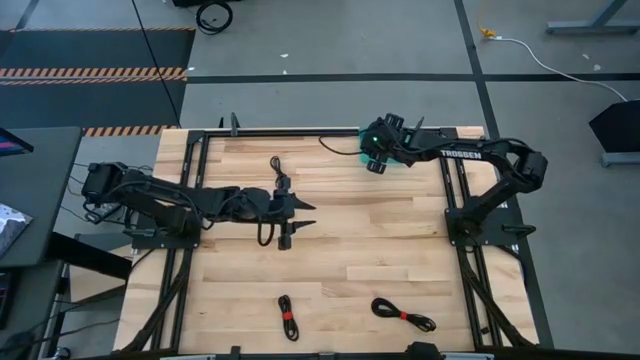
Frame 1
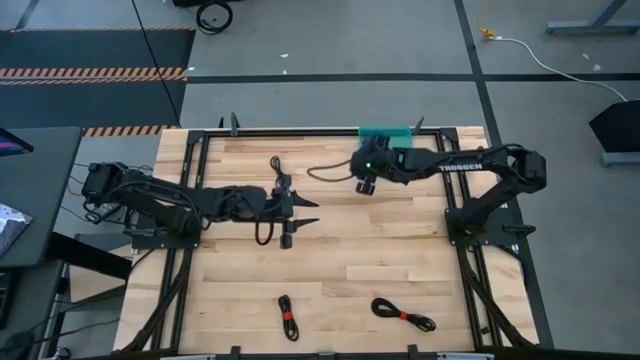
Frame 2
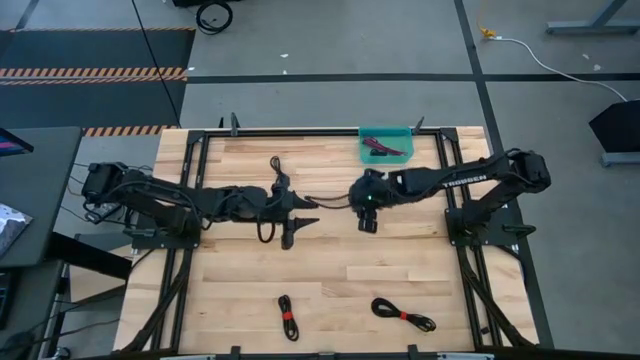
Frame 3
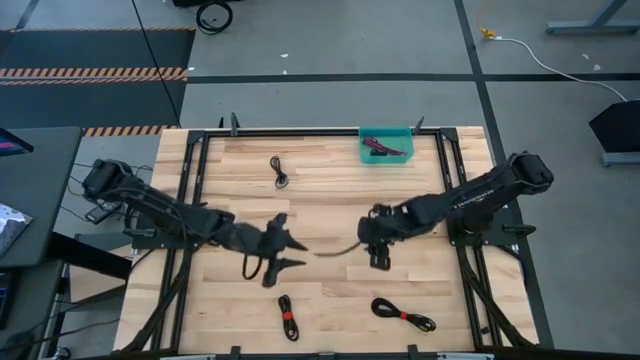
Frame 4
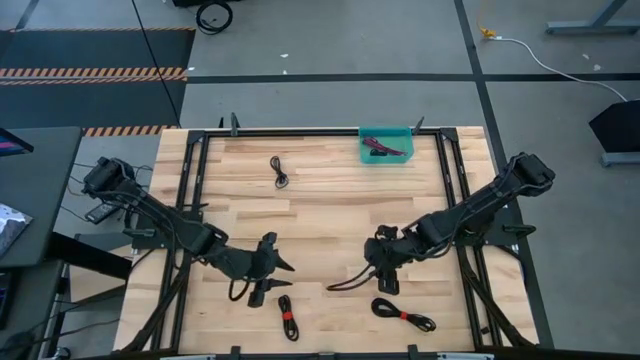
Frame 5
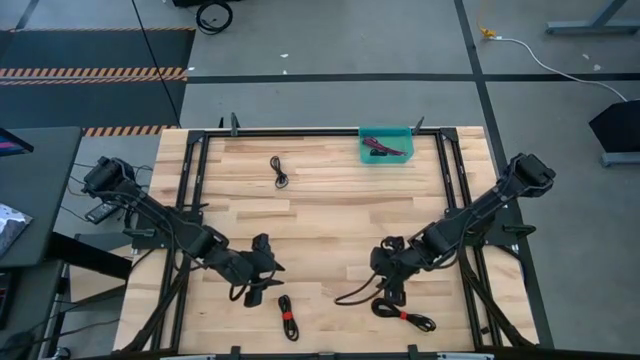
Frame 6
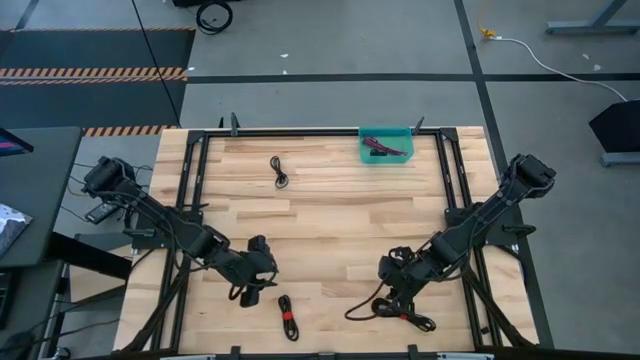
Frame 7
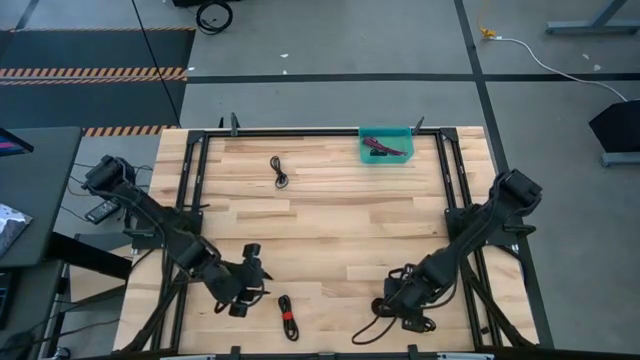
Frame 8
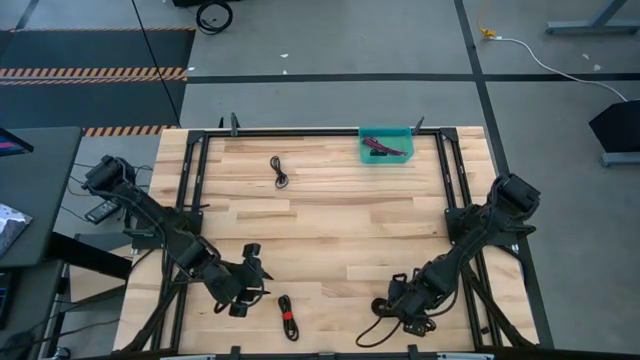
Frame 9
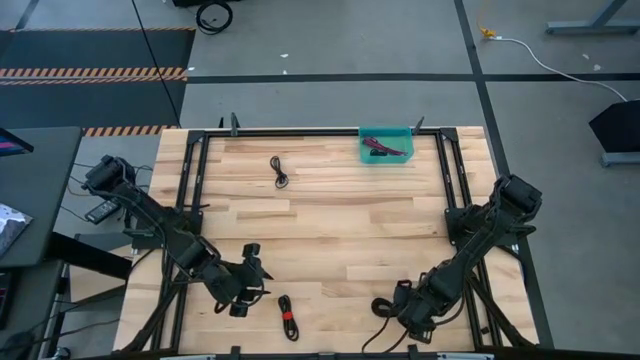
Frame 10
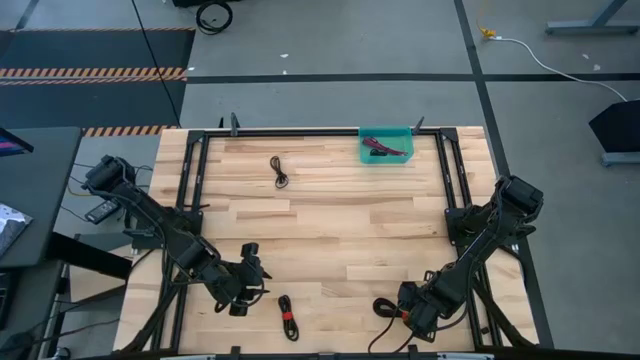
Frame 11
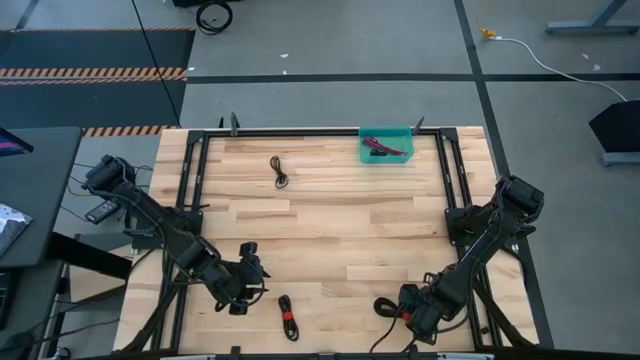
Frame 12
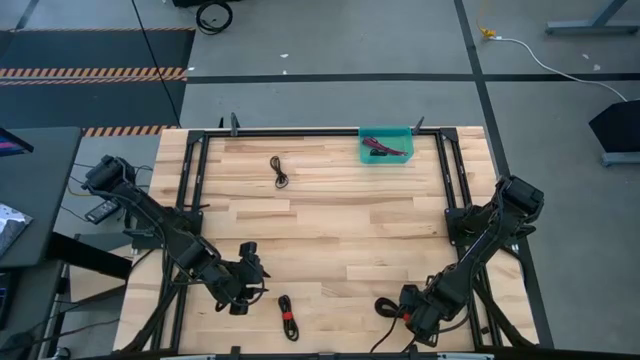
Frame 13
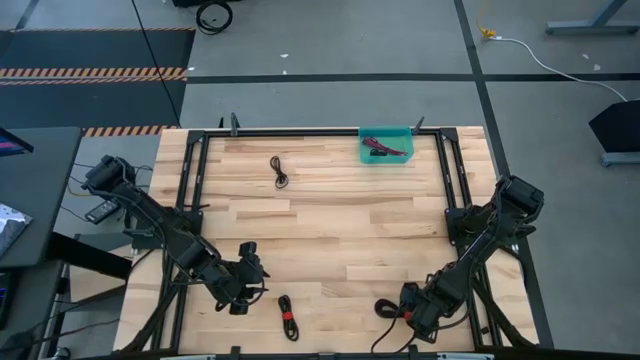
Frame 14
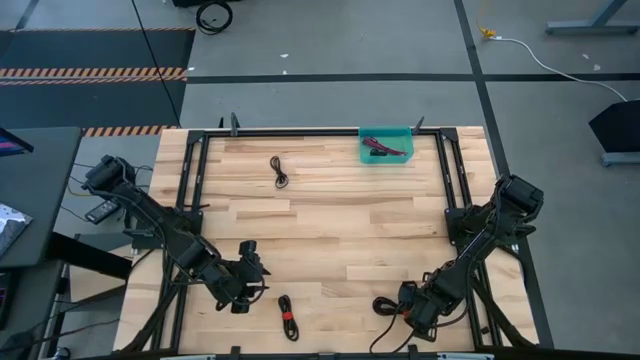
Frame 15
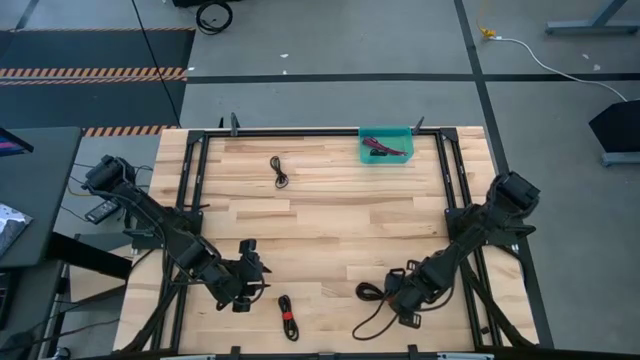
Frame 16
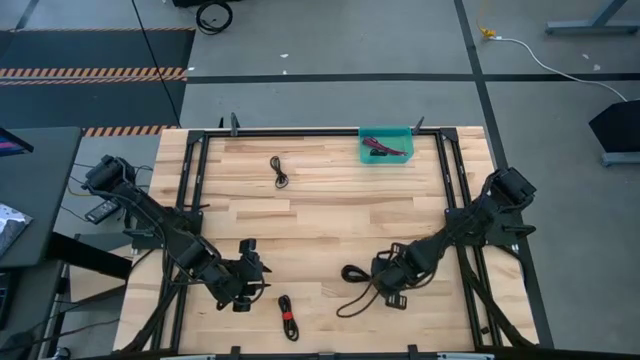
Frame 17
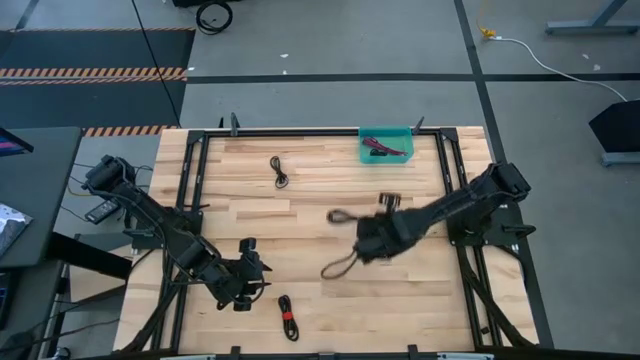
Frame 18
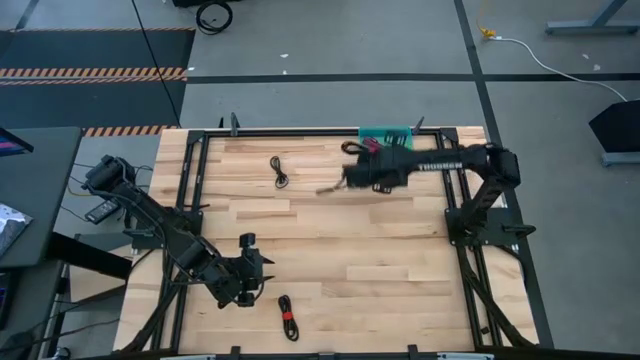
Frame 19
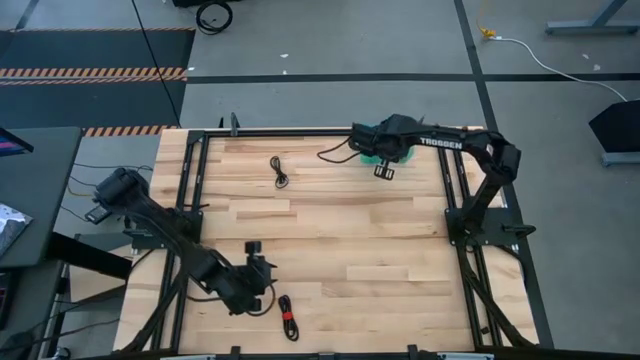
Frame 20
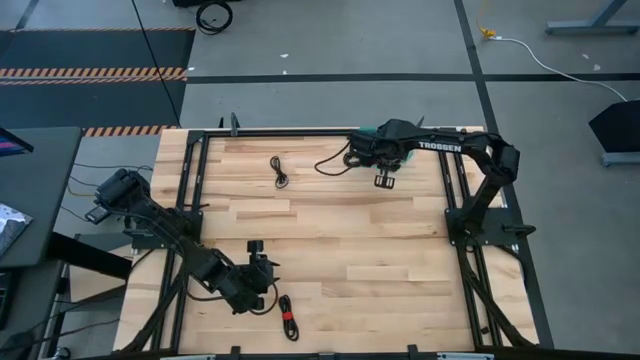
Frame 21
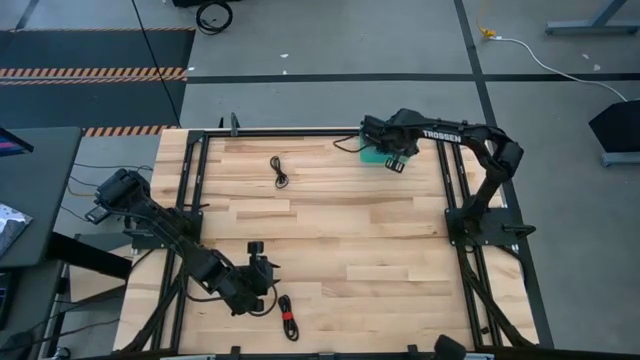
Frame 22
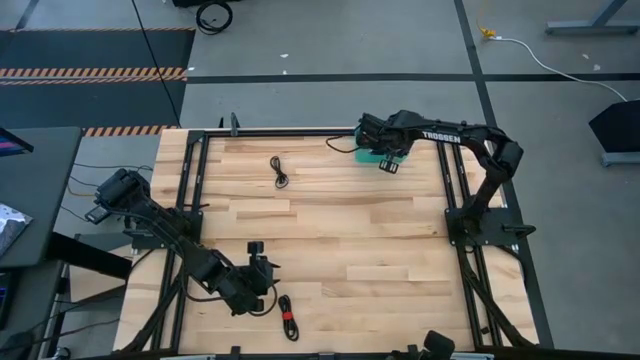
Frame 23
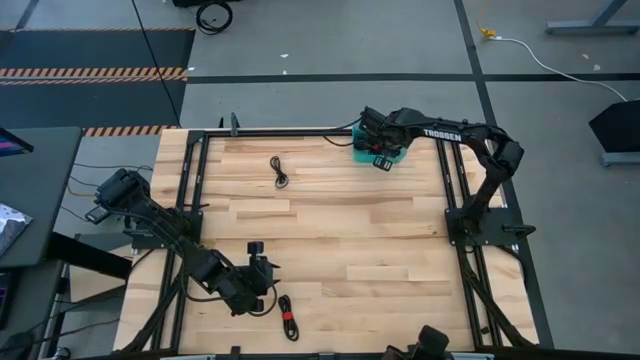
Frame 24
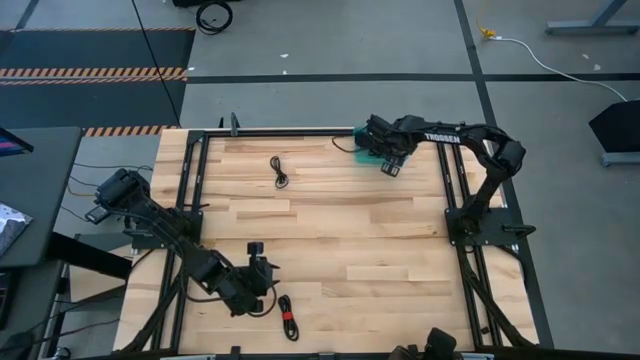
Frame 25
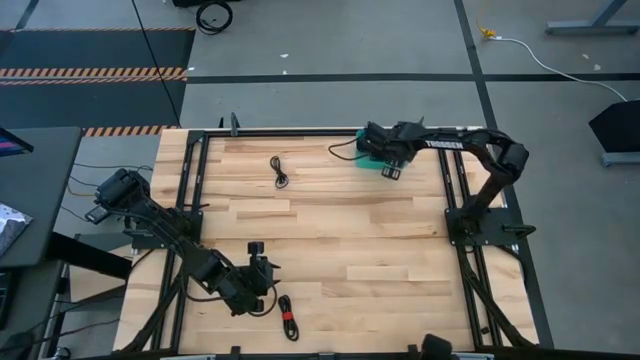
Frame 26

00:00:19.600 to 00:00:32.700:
Task: Pick and place USB-C Cables
Put the bottom right black usb cable into the bin

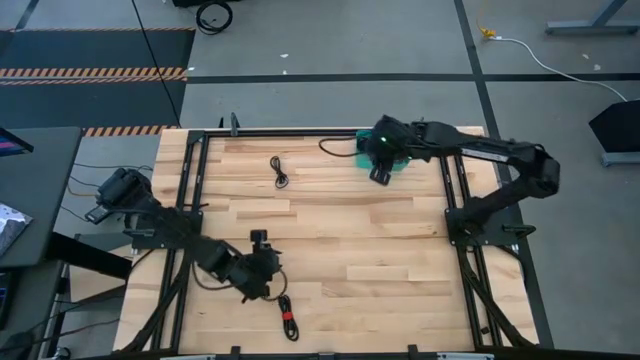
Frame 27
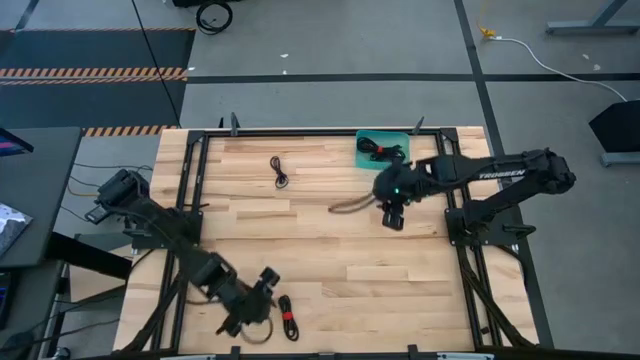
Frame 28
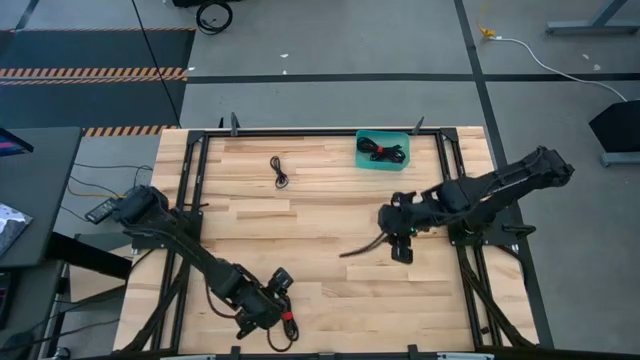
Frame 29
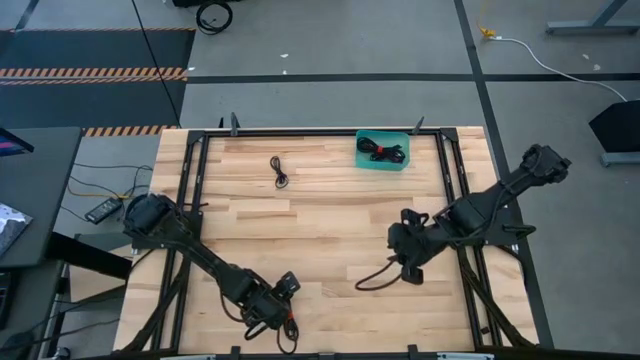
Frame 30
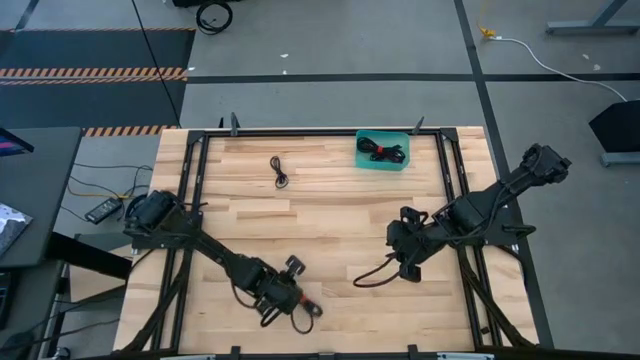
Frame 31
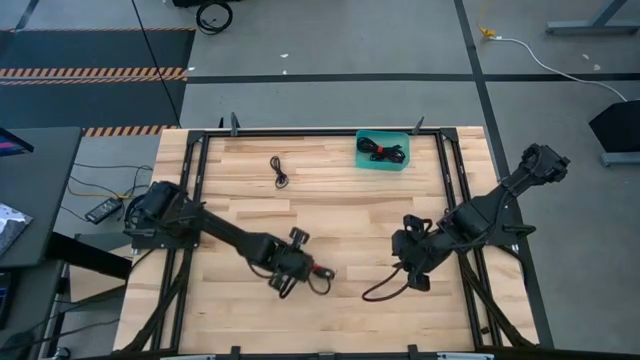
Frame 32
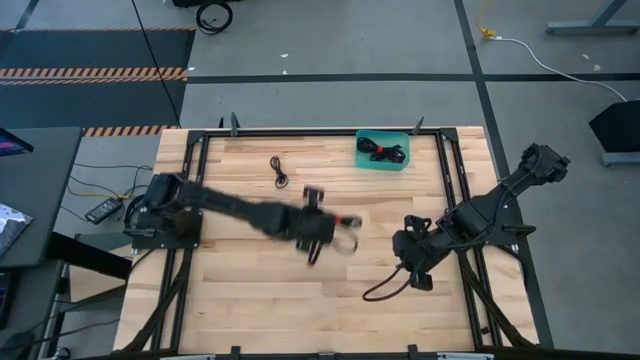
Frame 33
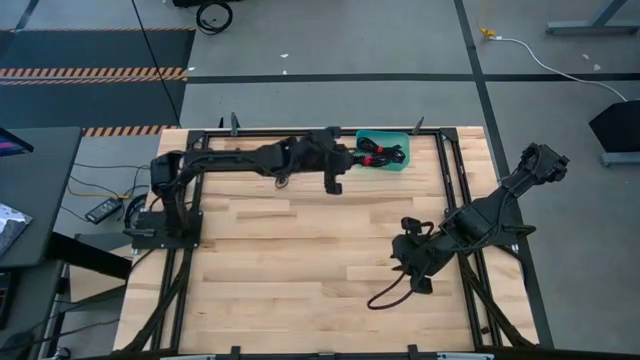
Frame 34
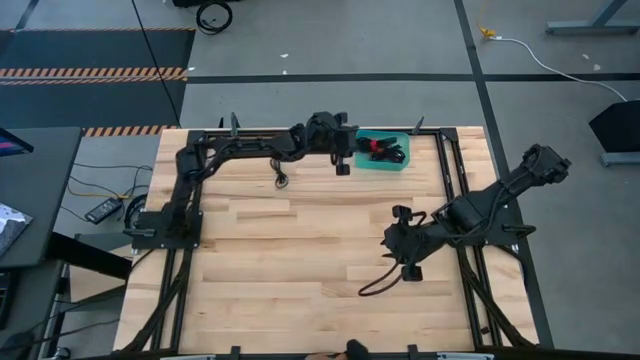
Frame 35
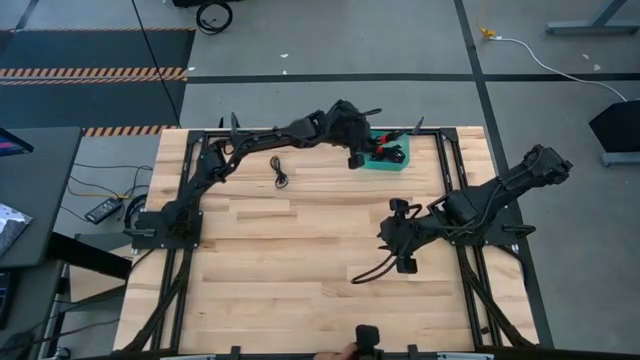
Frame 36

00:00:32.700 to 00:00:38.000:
Put the bottom black usb cable into the bin

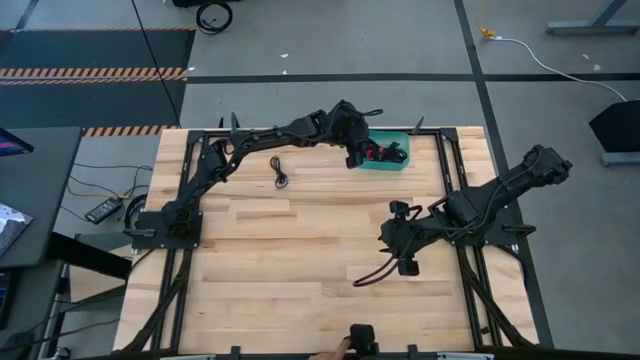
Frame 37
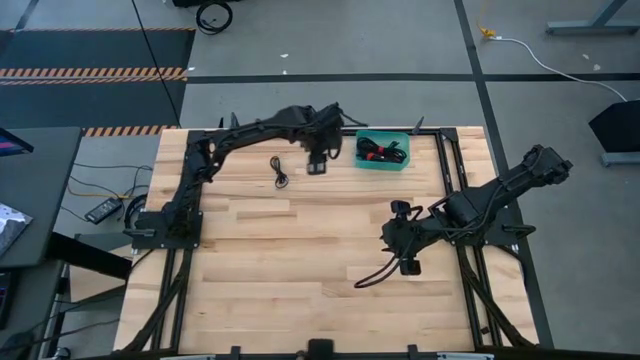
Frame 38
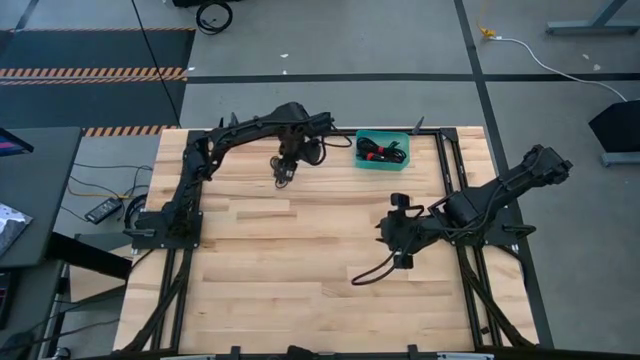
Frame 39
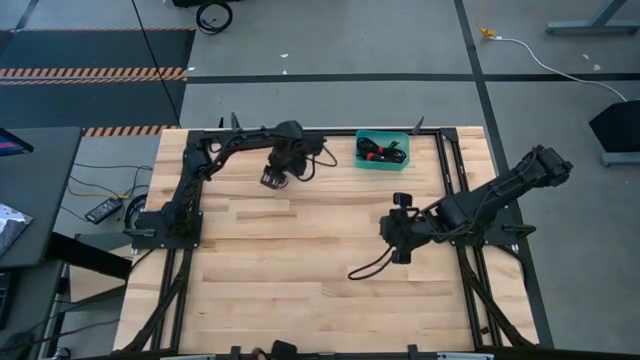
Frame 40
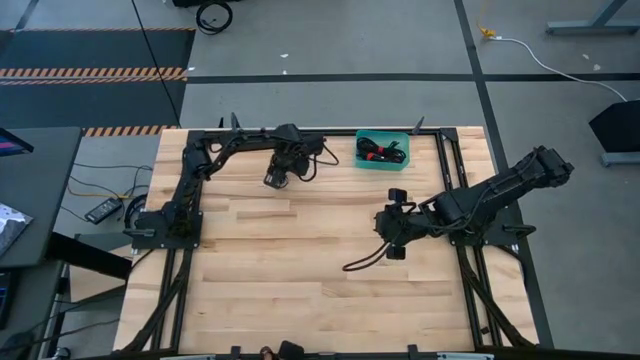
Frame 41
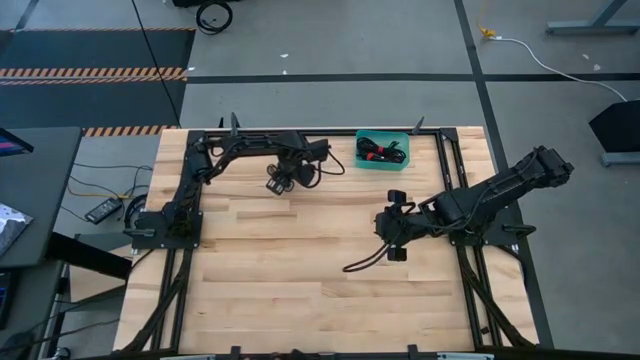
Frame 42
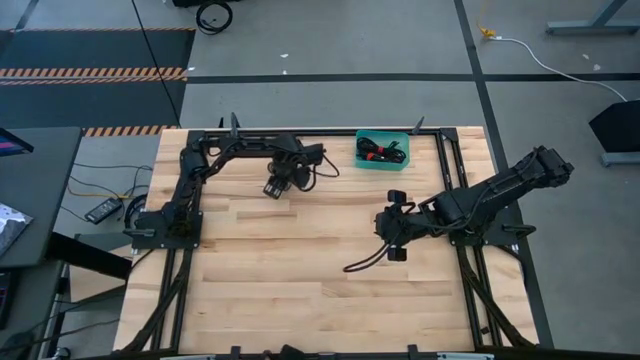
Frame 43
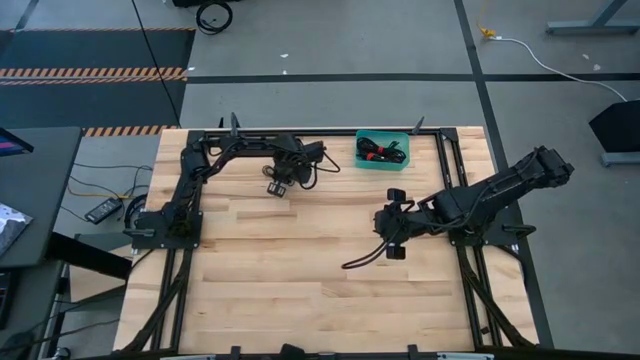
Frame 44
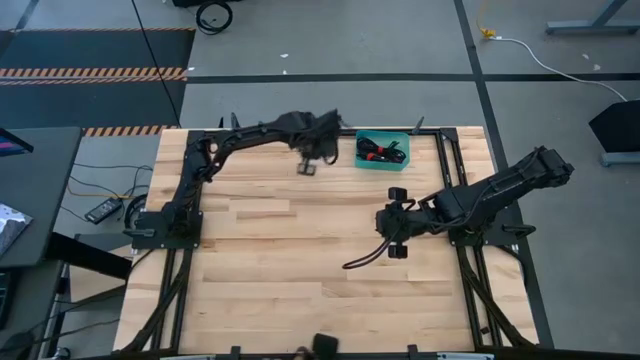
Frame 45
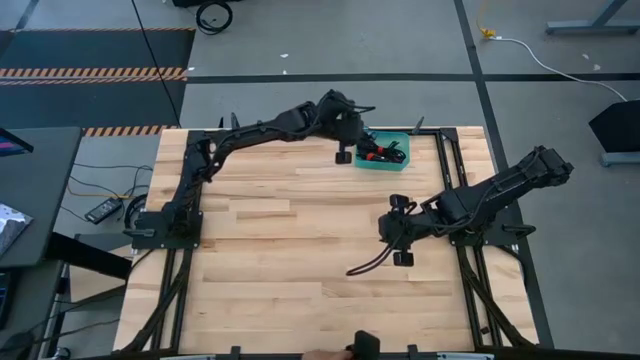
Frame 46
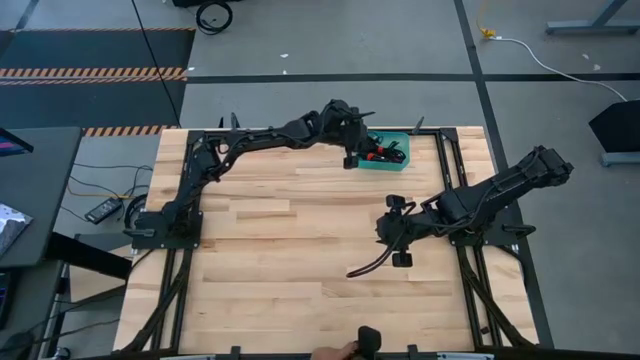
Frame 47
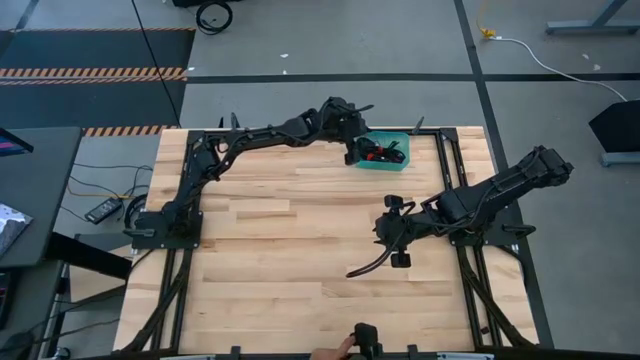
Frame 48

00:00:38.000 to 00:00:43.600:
Put the black usb cable into the bin
